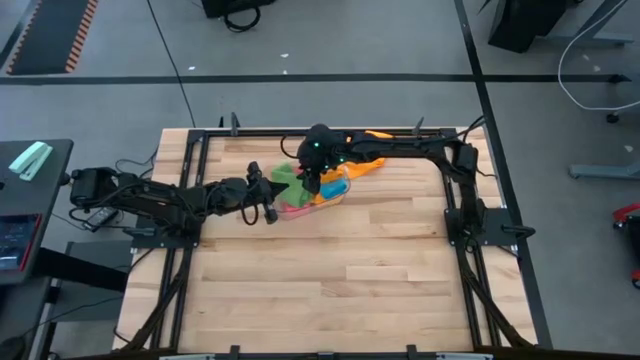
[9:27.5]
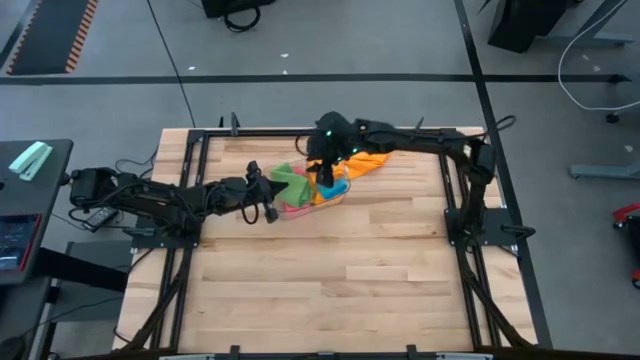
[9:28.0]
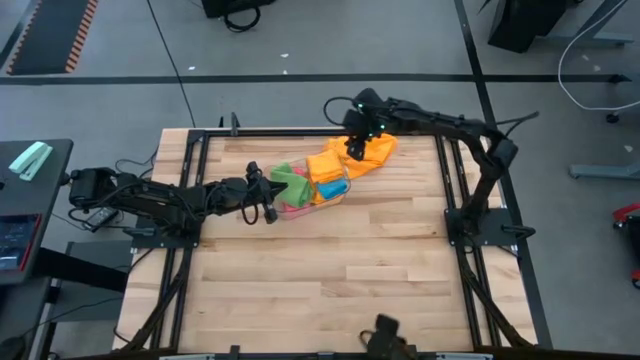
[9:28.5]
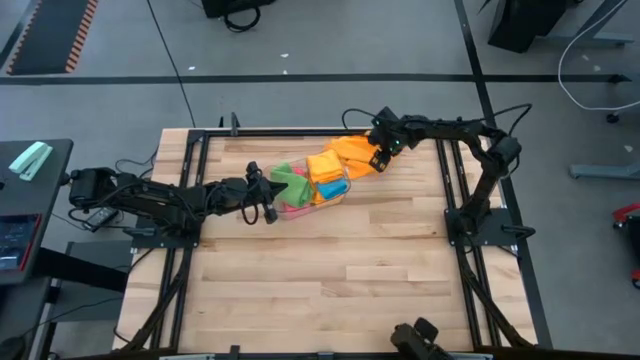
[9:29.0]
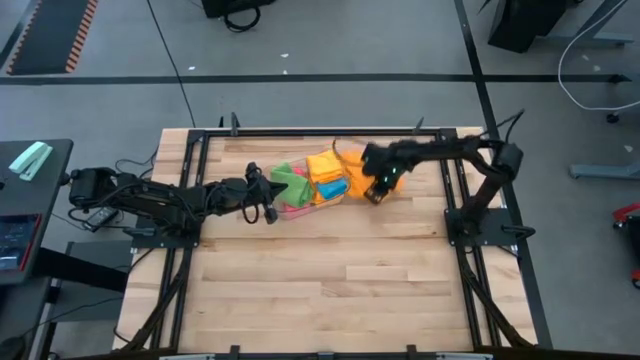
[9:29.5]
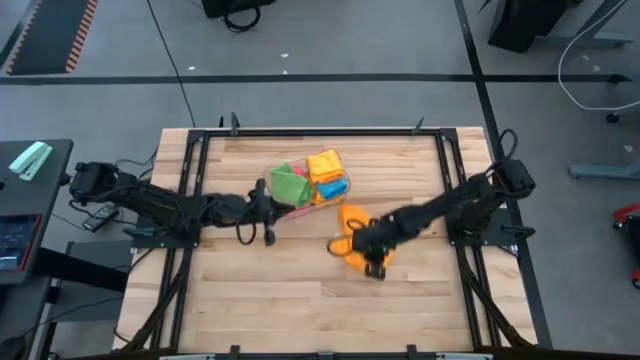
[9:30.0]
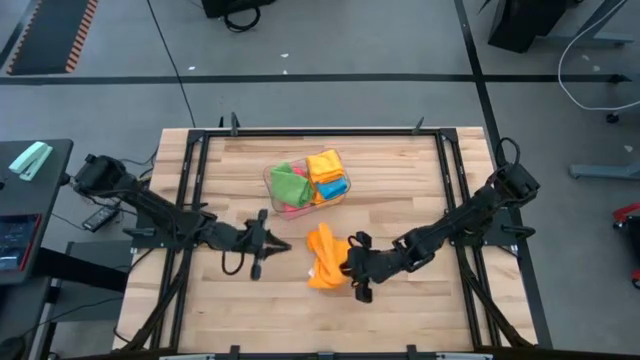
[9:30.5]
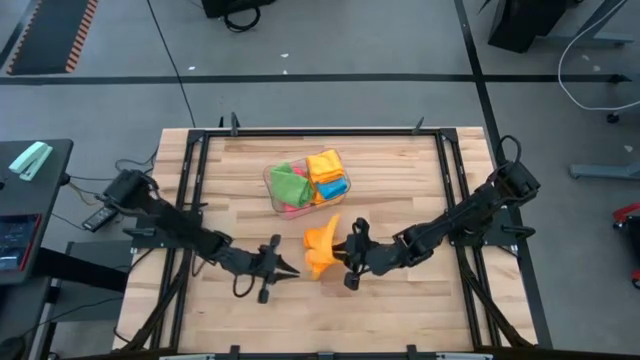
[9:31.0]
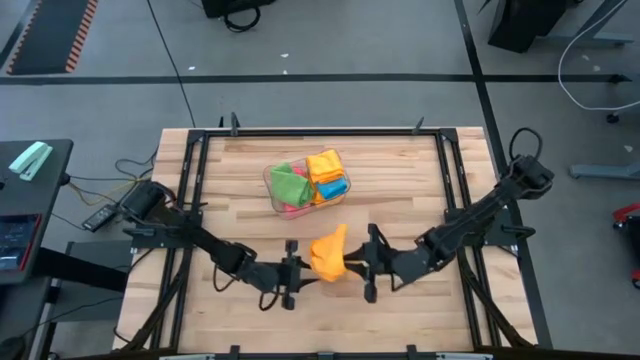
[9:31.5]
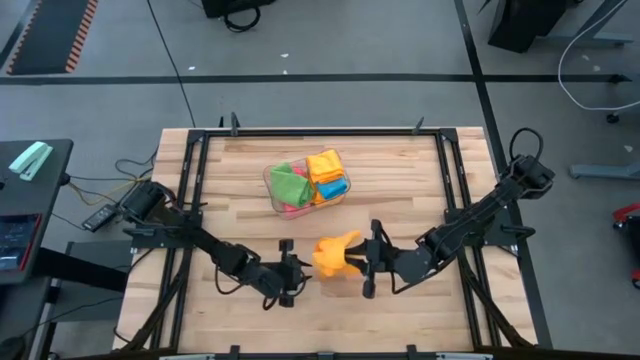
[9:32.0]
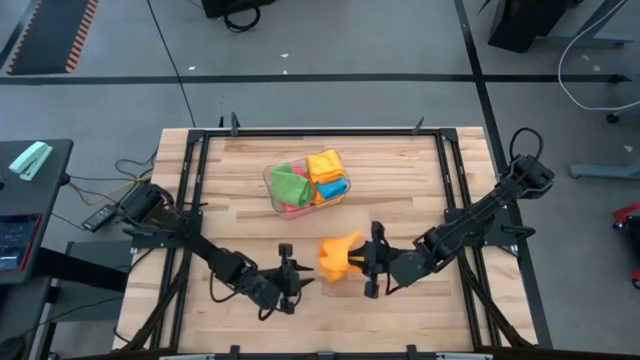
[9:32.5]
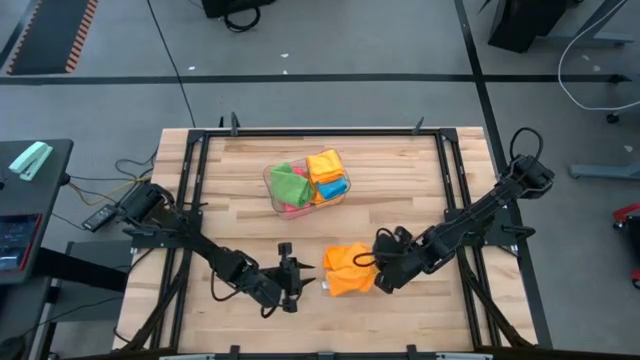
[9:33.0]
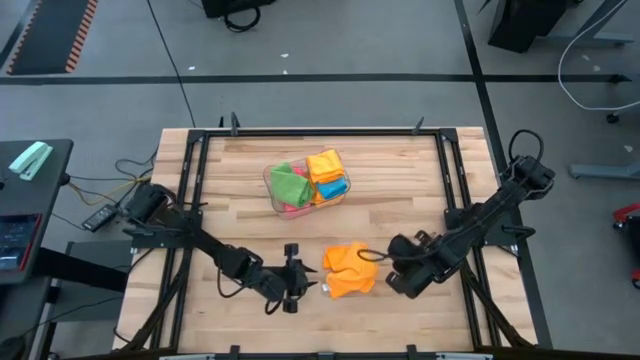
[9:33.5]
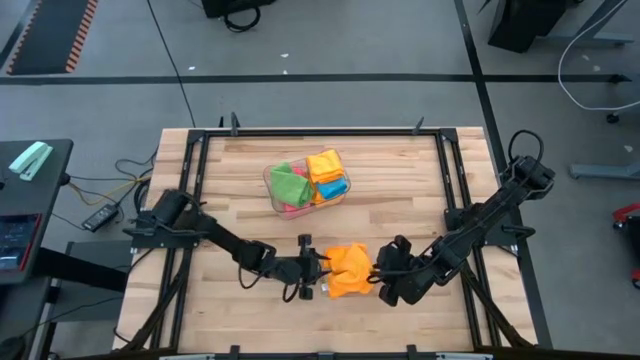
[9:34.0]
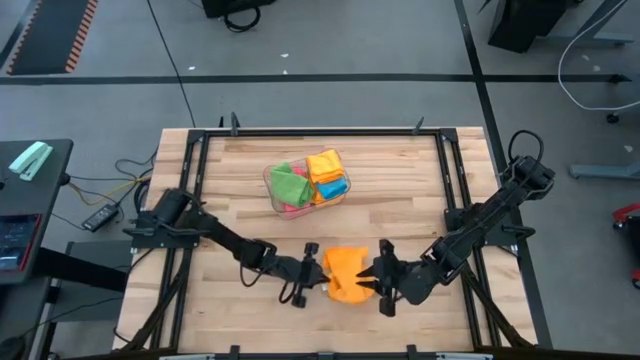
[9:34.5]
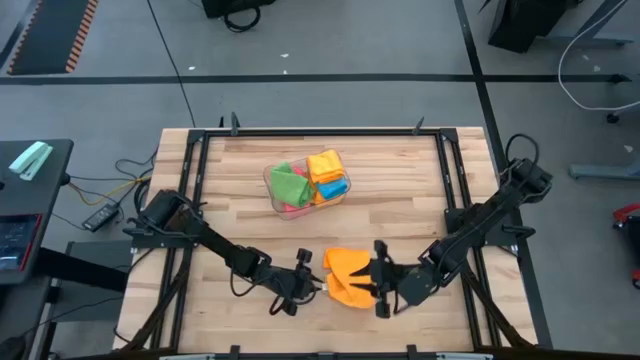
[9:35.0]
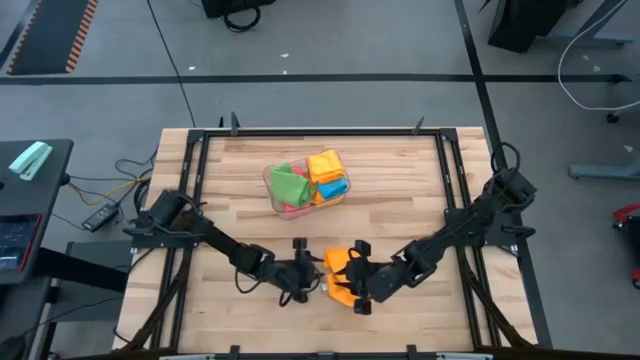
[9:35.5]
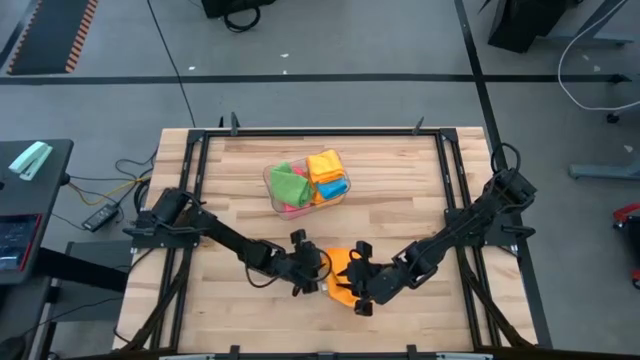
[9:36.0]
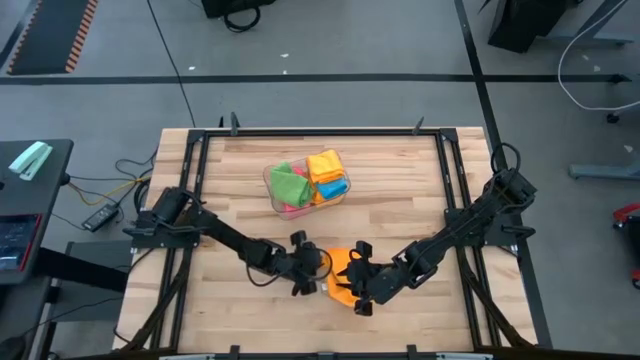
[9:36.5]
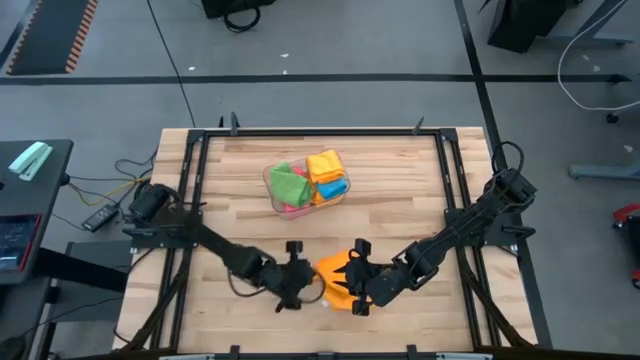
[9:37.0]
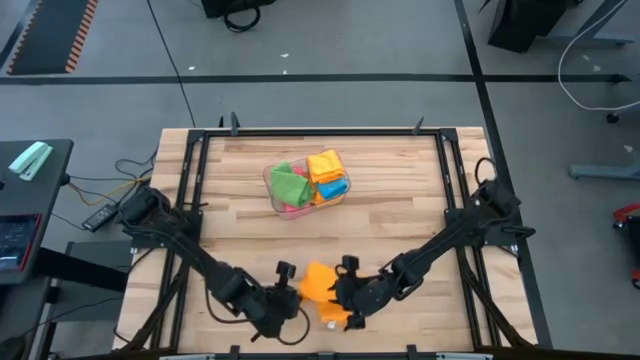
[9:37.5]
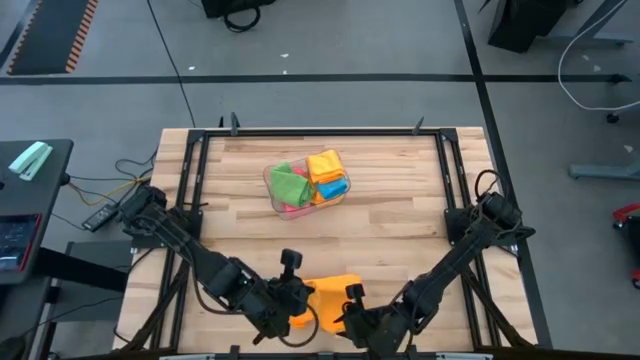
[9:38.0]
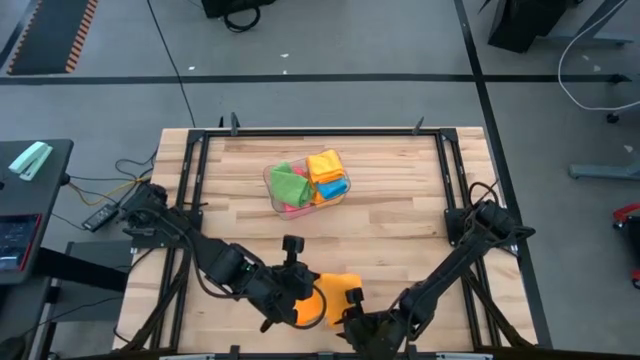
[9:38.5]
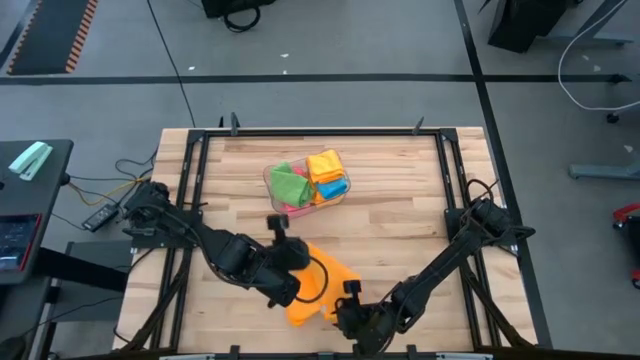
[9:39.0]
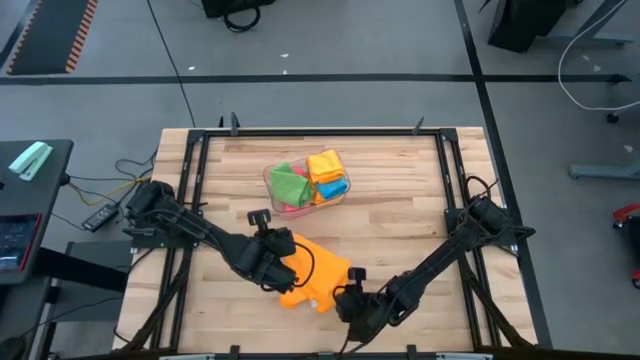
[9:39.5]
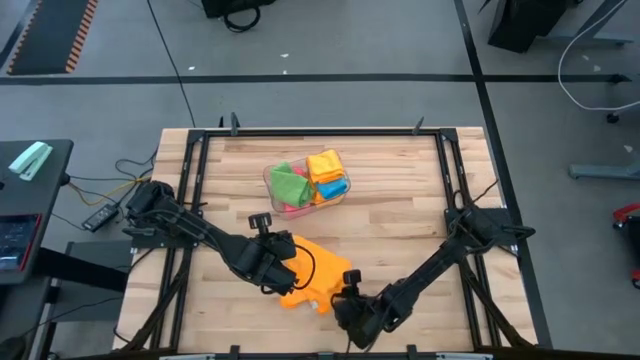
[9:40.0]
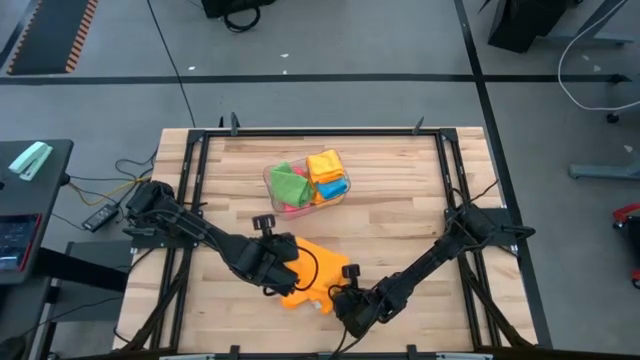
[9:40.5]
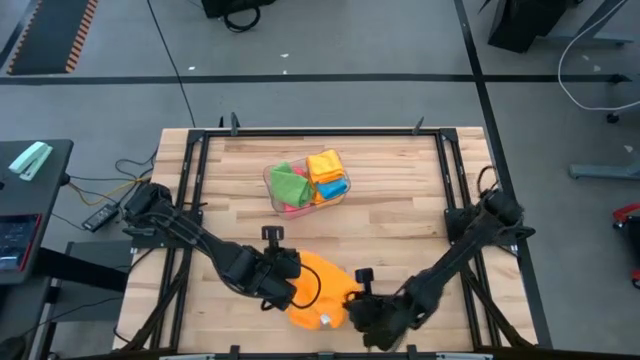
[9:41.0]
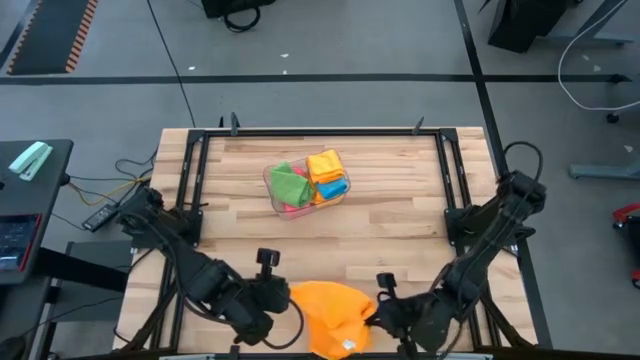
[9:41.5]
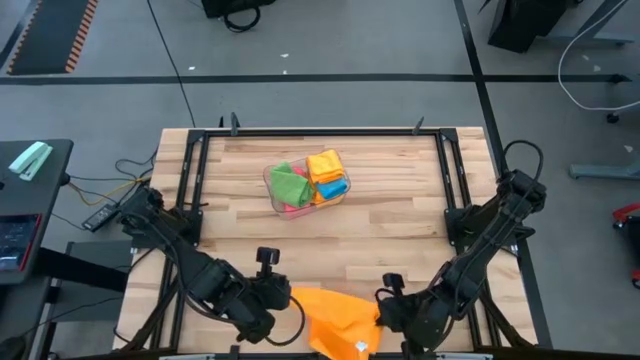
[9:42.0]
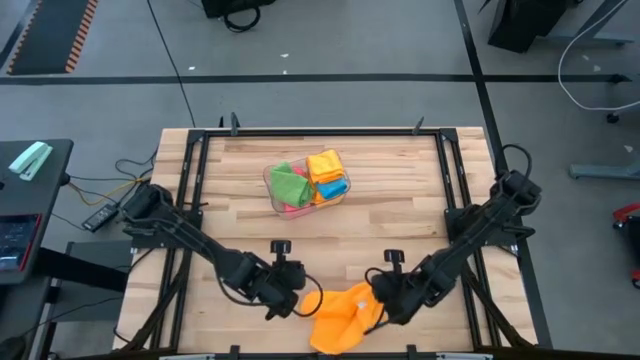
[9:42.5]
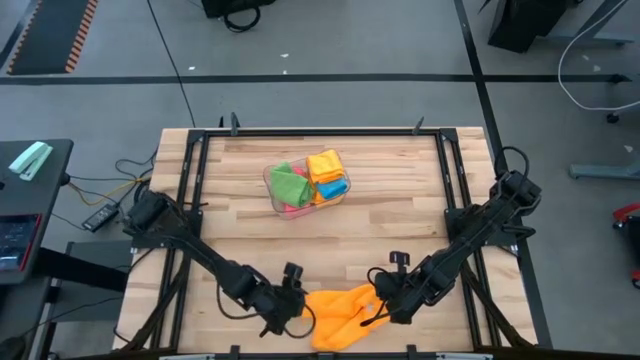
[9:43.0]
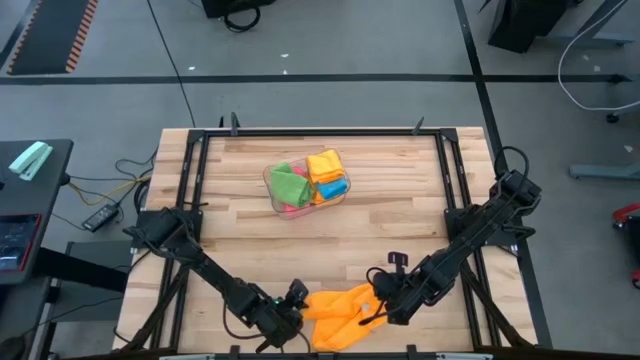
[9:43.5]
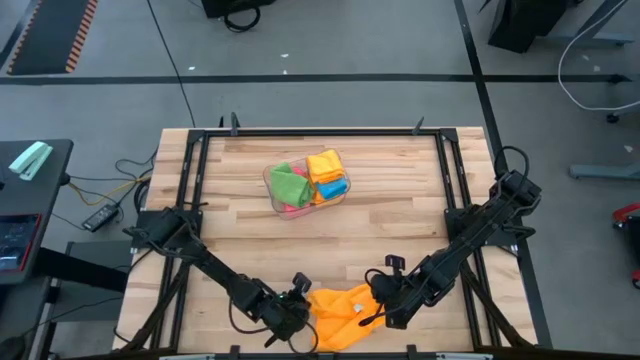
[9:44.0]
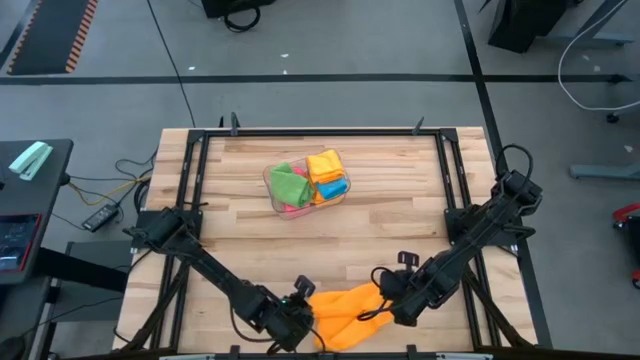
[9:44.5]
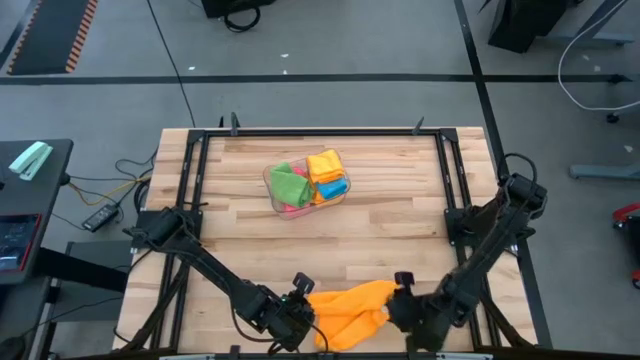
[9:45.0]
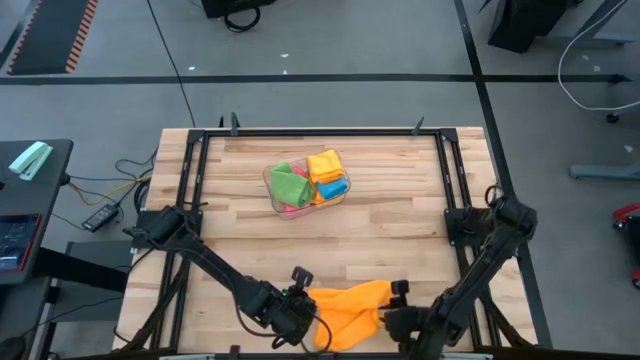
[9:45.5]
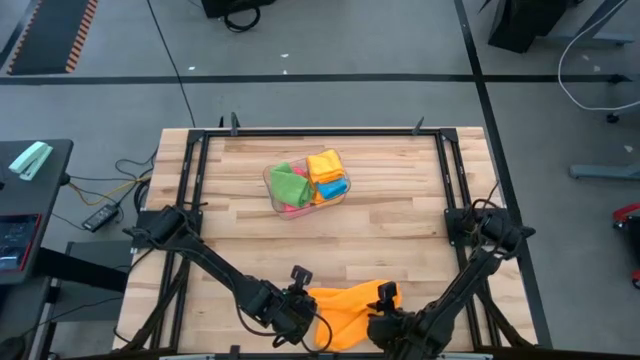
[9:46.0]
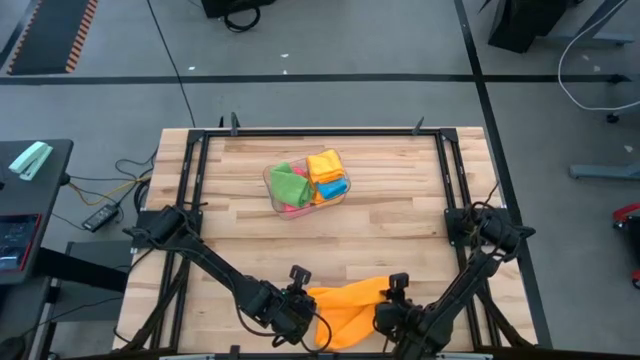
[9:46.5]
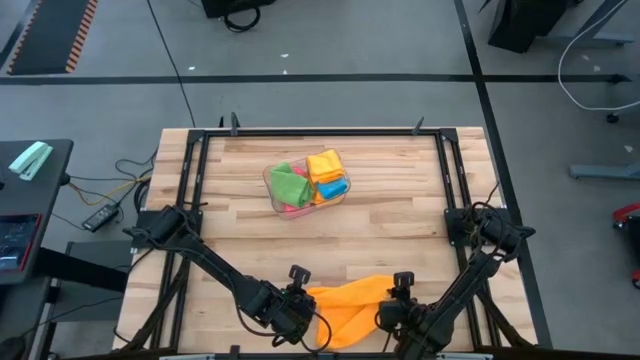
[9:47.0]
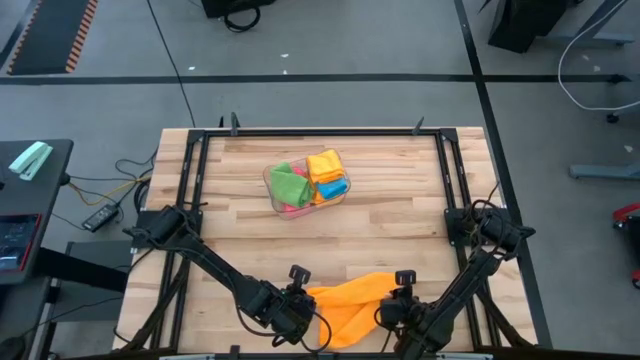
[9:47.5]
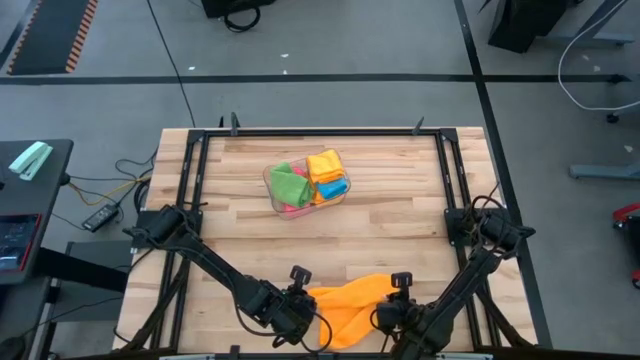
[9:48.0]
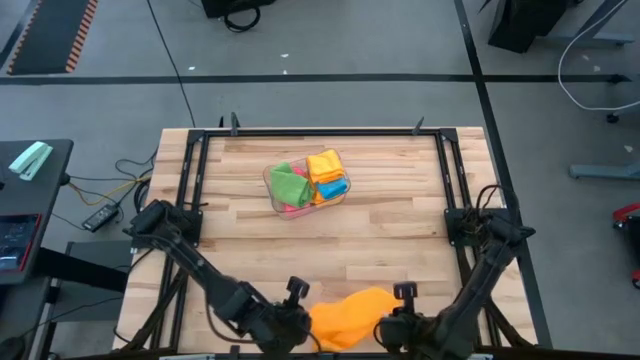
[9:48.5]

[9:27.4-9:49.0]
Task: Fold microfiber towels
Fold the orange microfiber cloth
